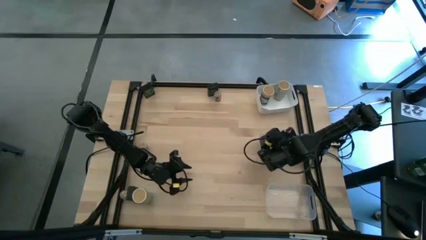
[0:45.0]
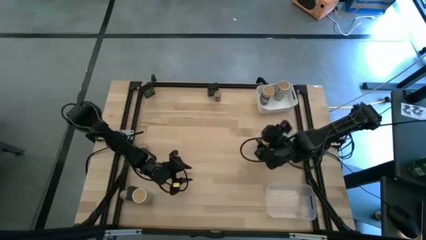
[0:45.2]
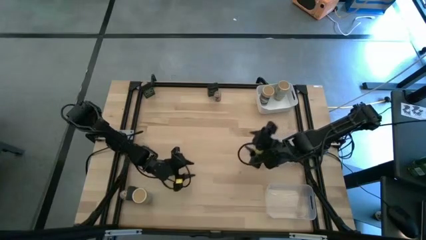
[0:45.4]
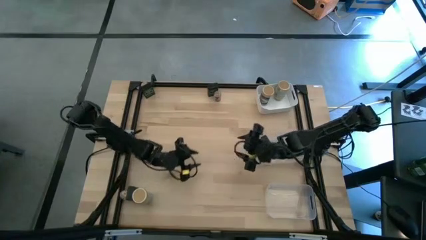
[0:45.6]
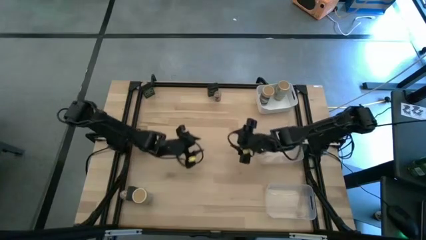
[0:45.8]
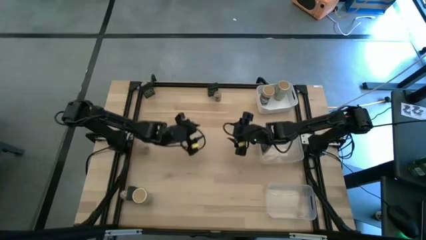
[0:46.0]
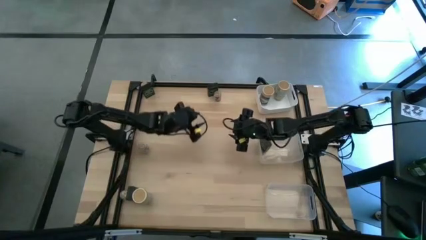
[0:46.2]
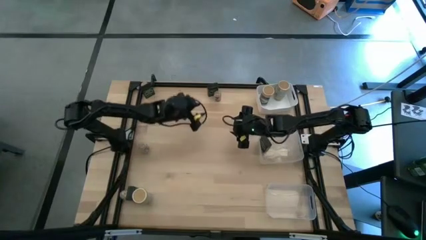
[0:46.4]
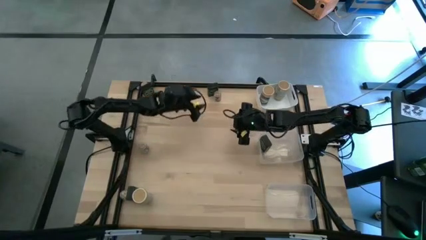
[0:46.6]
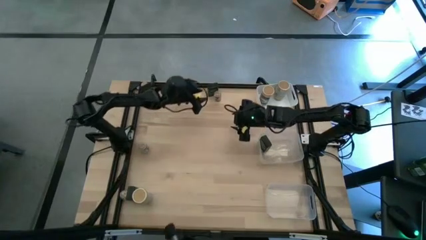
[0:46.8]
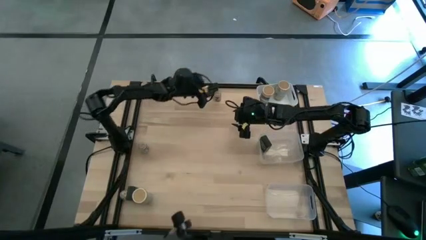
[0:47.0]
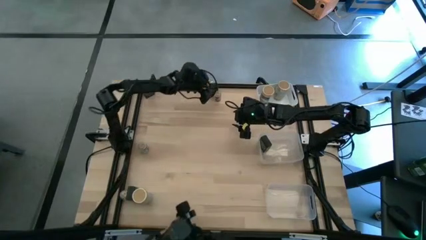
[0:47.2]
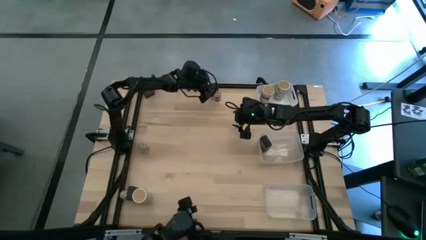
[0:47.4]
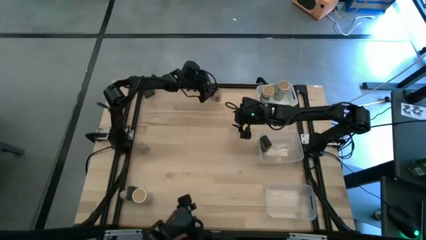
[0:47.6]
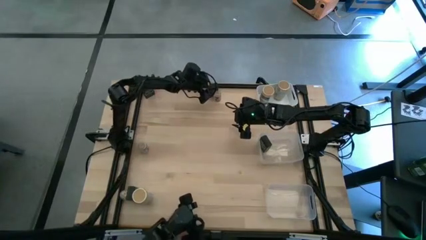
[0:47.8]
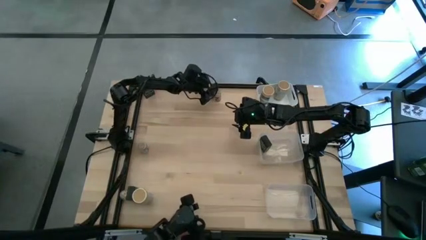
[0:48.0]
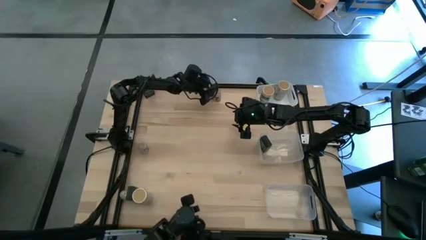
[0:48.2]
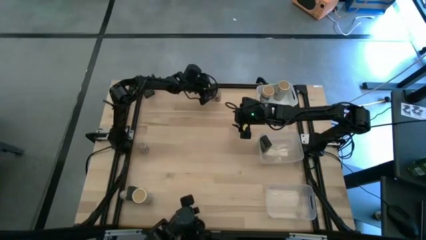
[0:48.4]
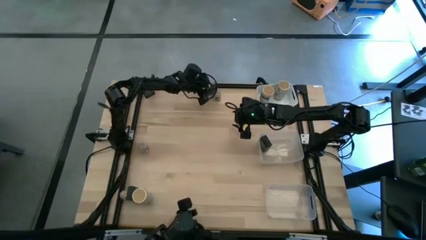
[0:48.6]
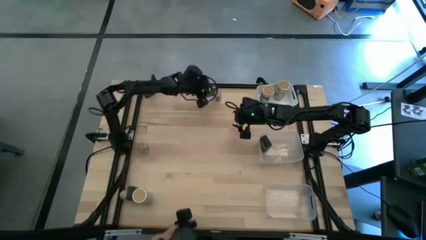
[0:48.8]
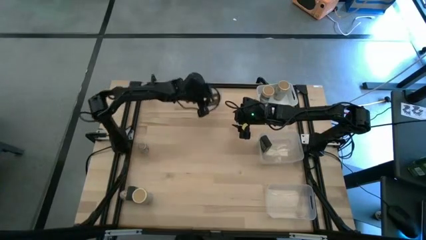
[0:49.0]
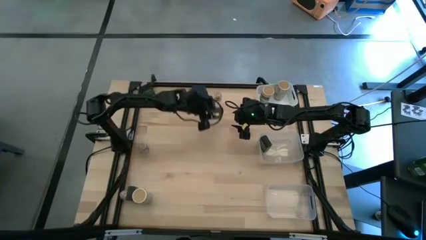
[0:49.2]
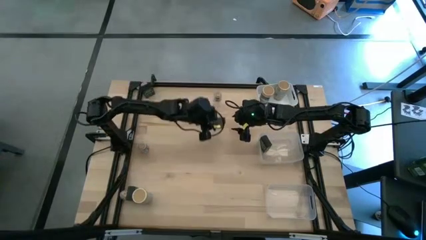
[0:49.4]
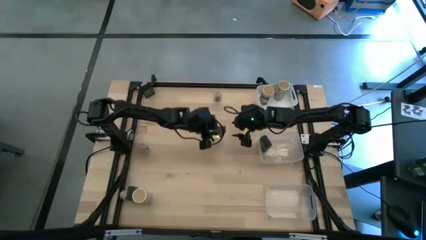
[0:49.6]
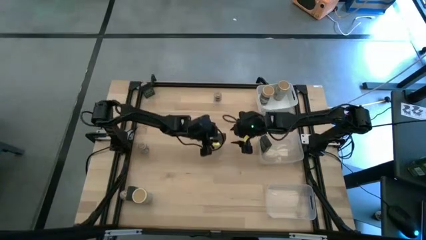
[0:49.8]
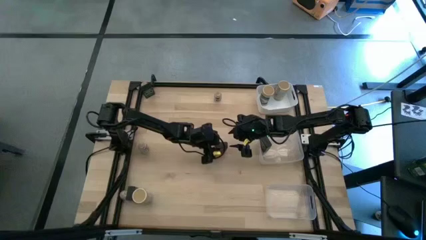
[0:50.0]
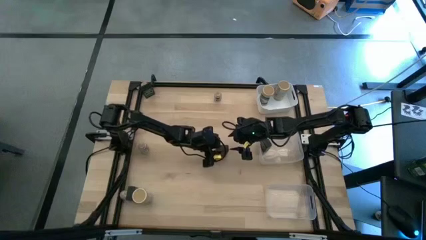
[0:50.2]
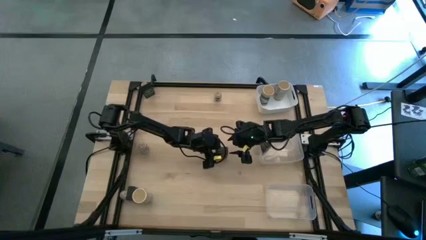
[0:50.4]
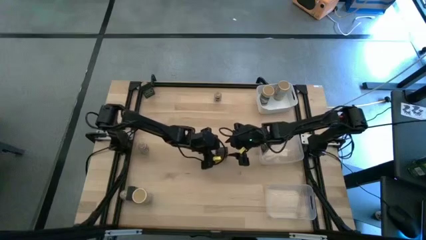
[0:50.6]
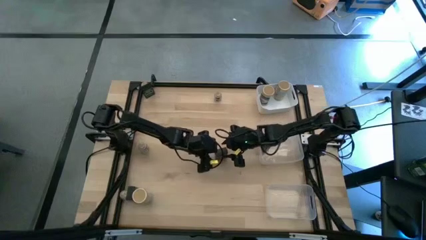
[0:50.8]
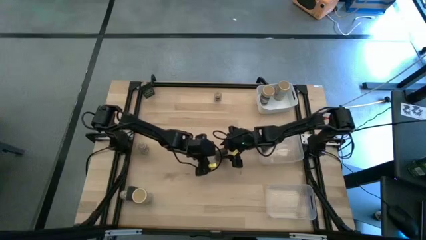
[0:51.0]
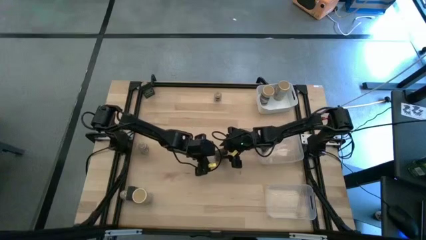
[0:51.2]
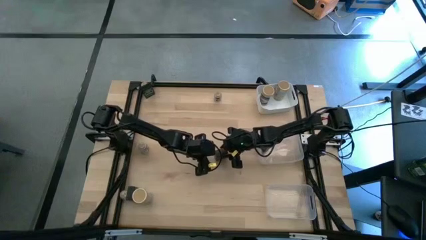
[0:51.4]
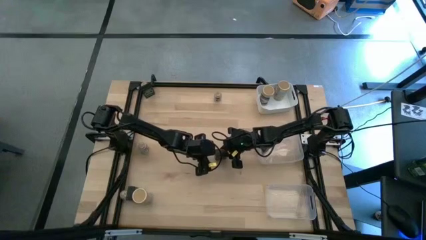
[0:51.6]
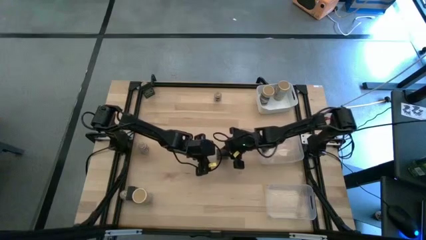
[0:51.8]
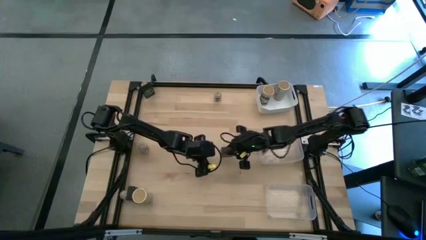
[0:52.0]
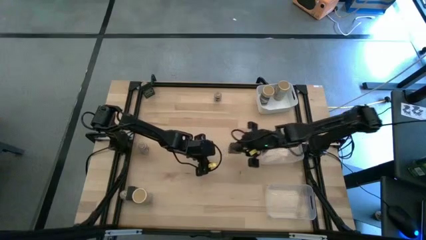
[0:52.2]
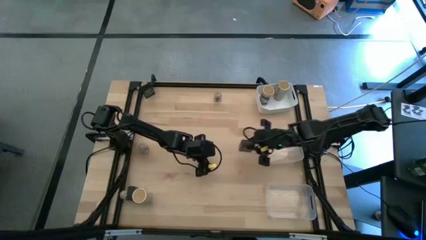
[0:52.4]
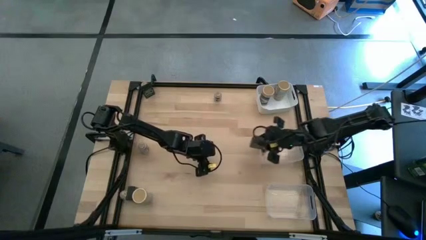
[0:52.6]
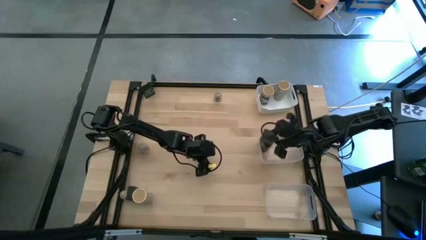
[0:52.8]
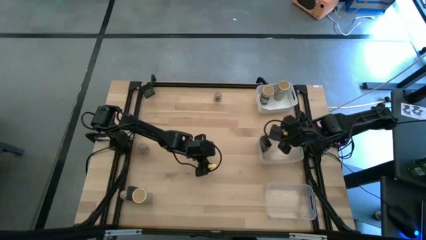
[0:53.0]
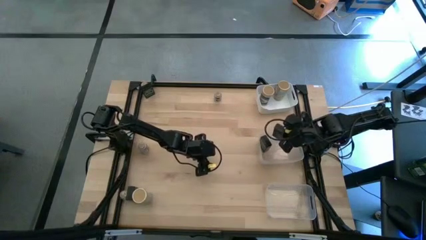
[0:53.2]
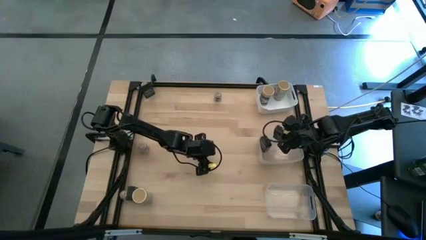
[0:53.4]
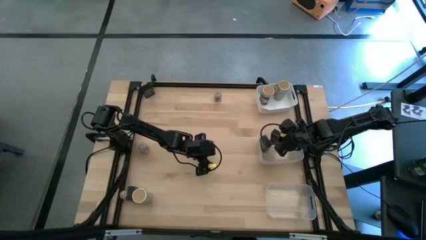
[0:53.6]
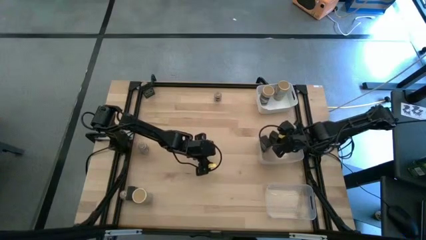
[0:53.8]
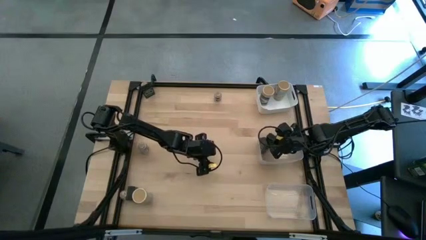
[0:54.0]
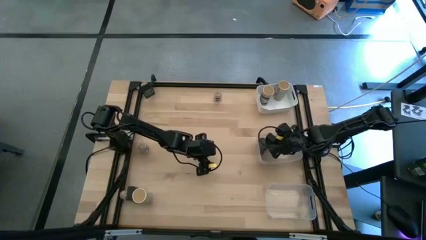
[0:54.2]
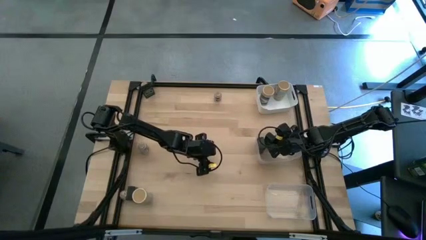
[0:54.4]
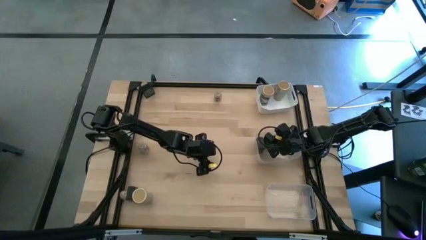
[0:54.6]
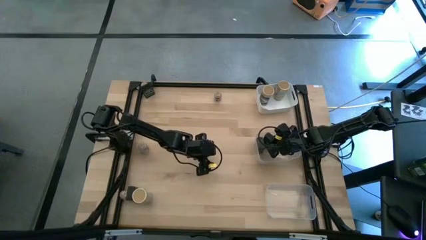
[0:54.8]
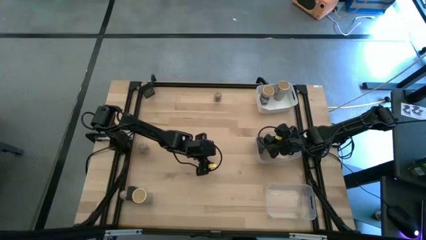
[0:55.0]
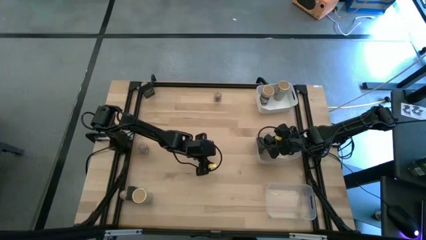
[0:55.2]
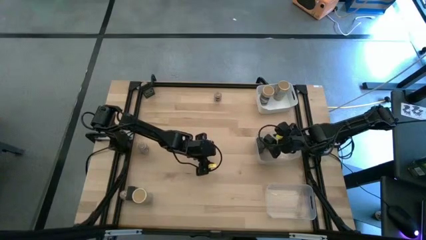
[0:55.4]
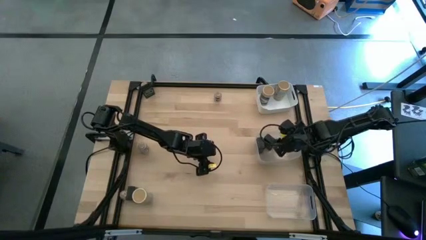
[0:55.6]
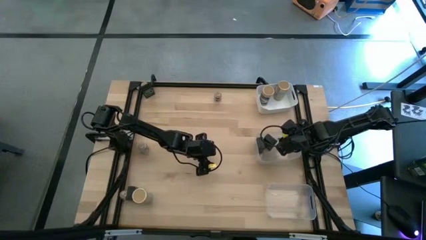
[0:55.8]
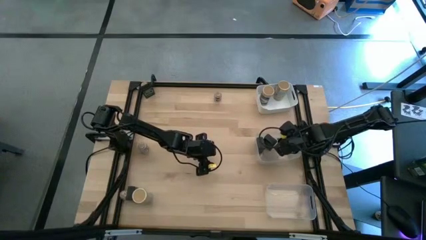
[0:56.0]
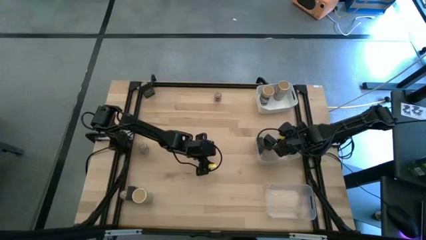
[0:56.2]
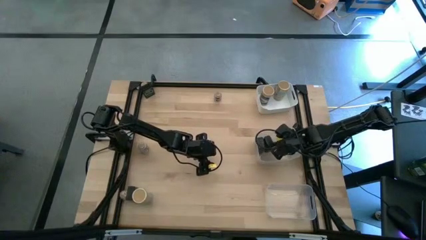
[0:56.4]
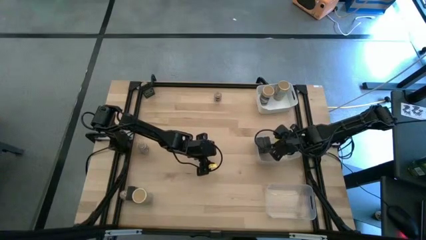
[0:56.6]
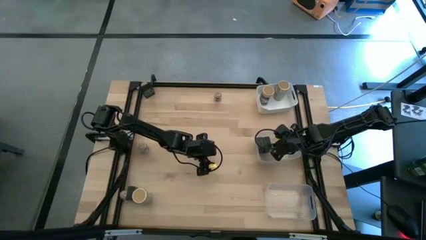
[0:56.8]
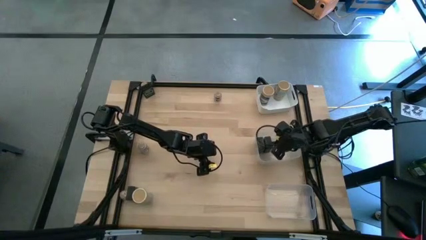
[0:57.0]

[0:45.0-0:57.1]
Task: Sort spices by type
Put the top right black seasoning container into the top transparent bin

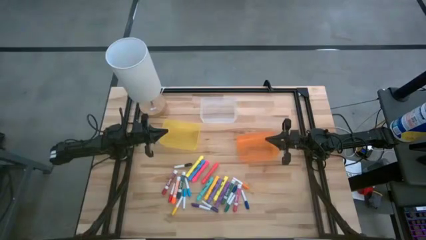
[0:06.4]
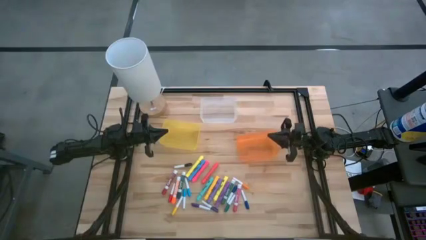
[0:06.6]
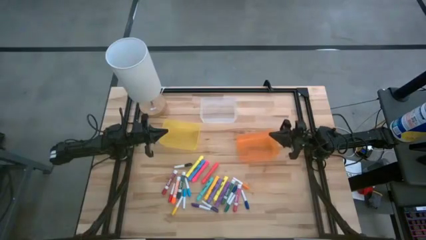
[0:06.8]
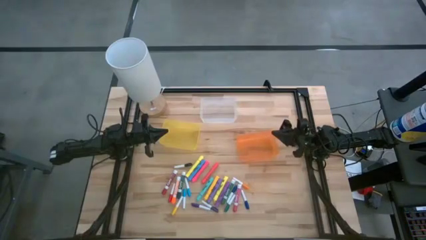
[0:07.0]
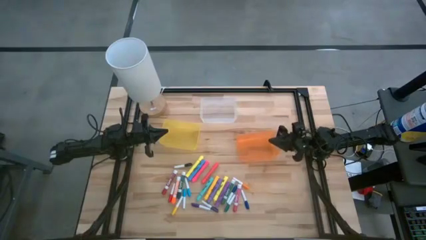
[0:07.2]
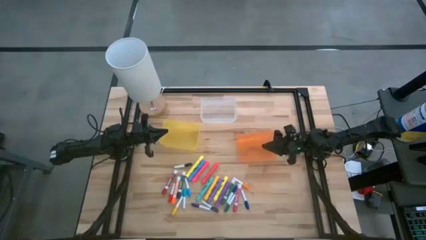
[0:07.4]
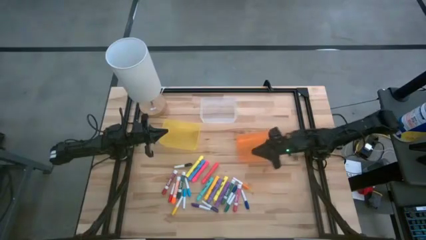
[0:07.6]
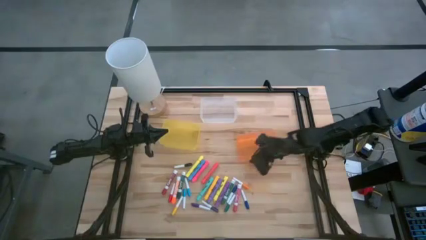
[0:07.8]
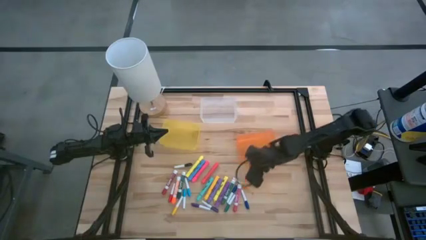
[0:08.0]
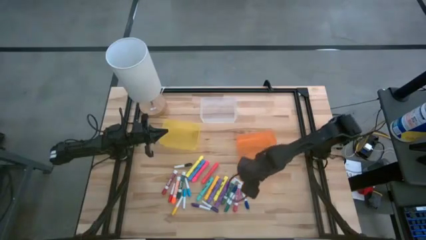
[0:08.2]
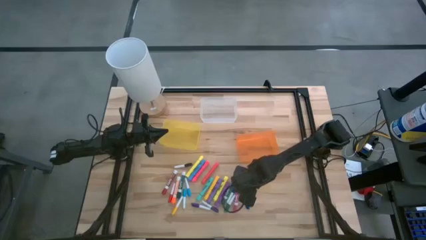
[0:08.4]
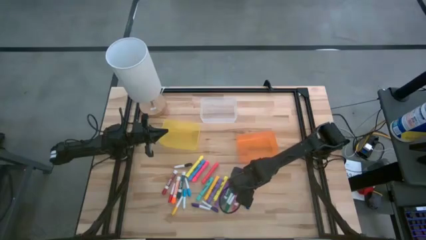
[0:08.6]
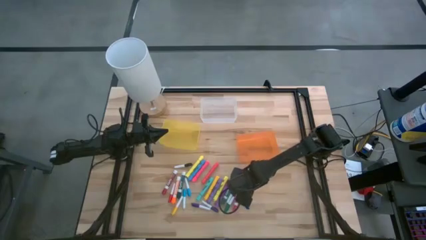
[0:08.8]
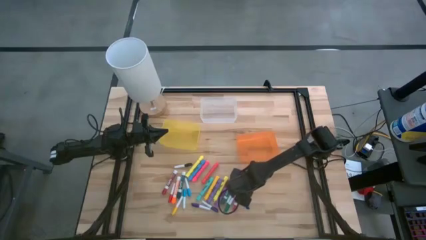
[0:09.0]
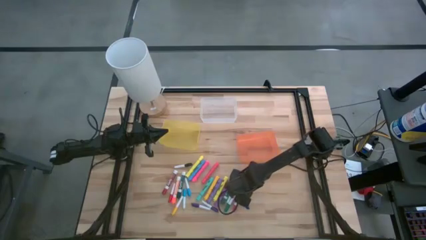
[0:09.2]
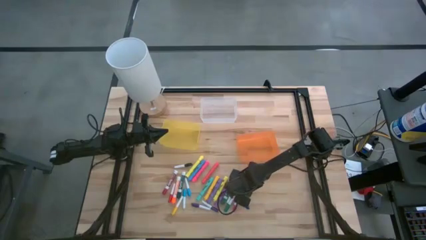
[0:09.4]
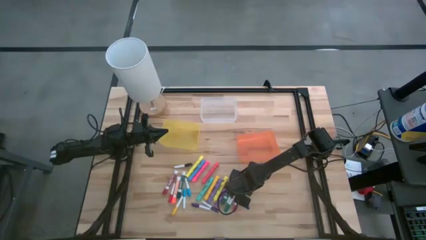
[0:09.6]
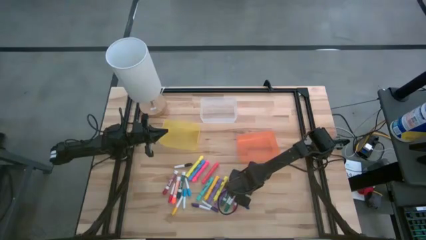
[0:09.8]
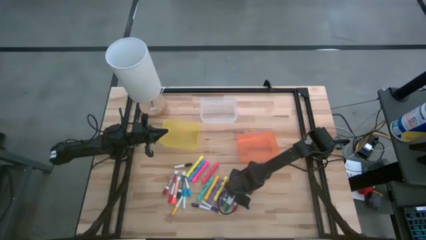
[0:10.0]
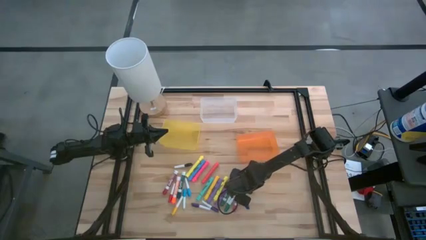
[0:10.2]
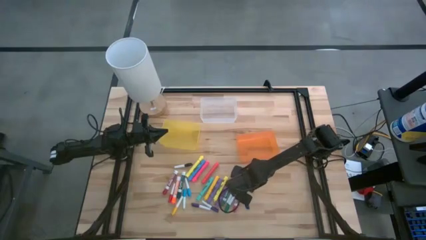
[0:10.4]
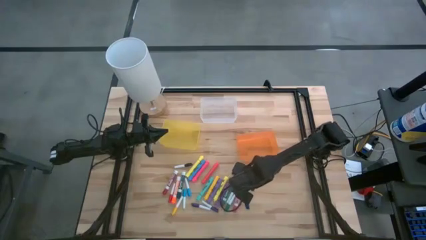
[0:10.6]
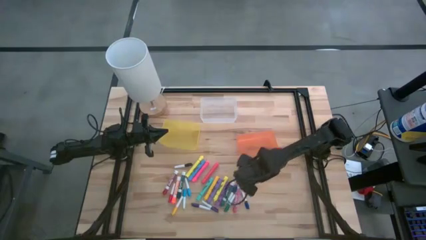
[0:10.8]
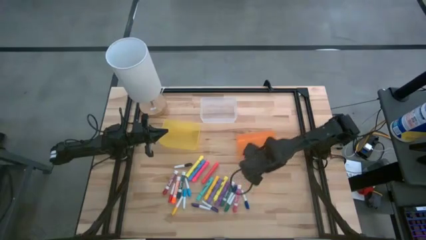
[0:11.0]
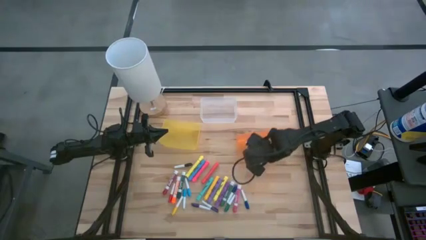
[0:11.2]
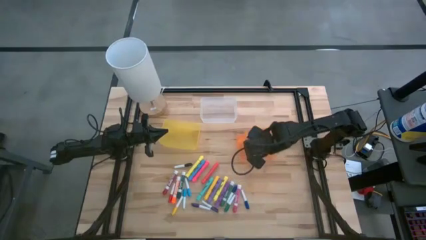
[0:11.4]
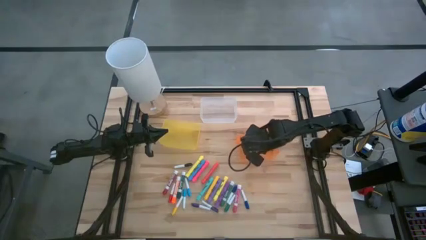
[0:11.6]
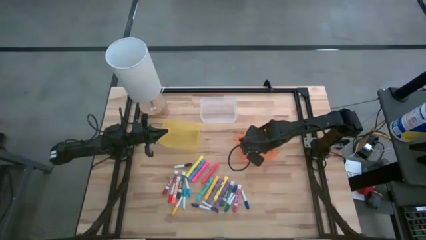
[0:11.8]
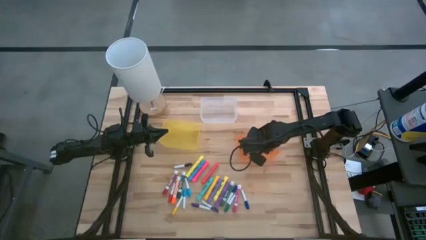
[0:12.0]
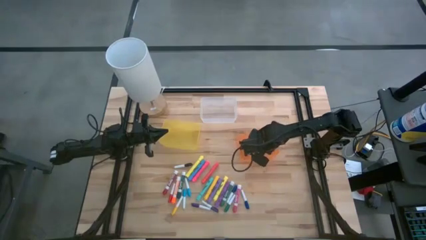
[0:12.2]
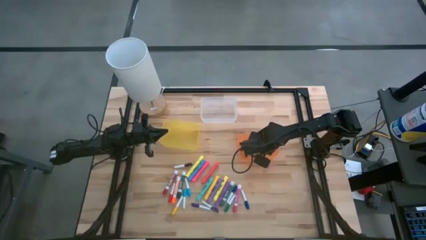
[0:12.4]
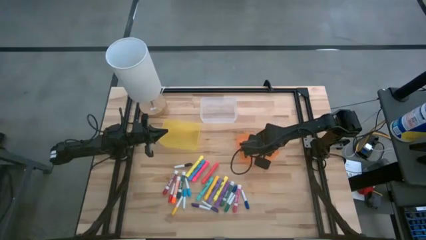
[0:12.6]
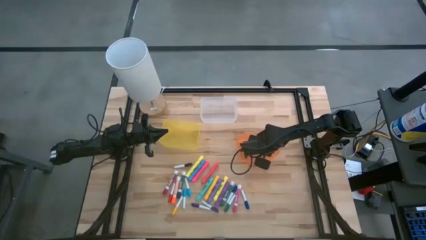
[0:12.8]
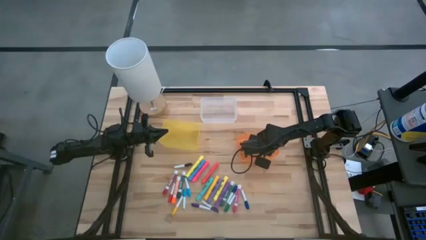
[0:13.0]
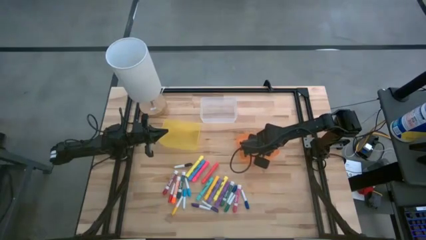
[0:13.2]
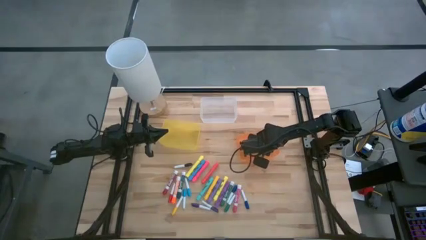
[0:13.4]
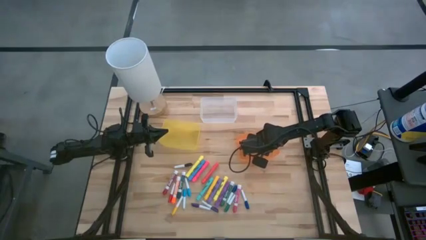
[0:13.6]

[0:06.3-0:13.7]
Task: Pick & Place Markers
Put the small orange highlighter pen into the orange bin
